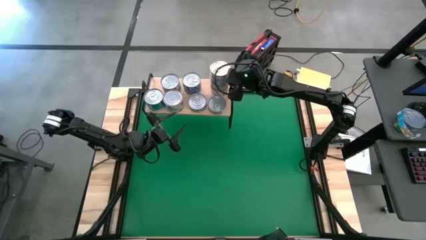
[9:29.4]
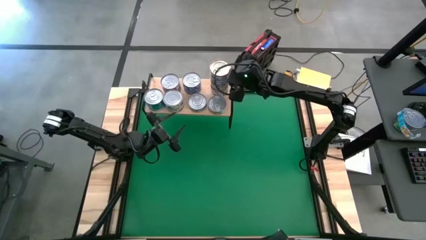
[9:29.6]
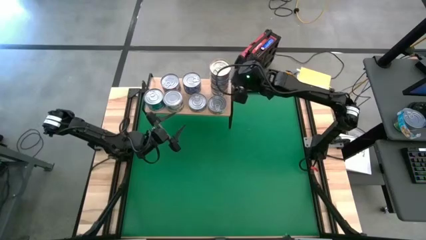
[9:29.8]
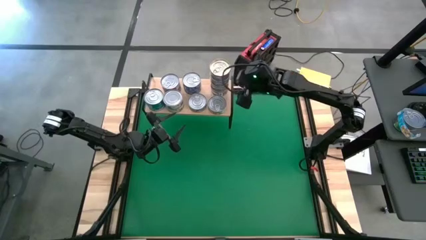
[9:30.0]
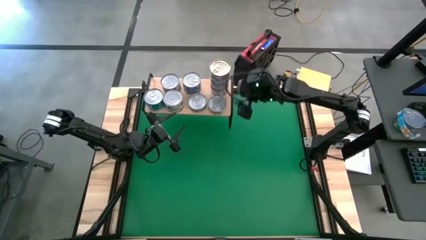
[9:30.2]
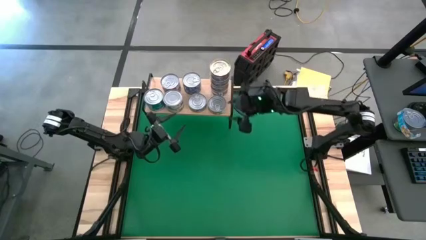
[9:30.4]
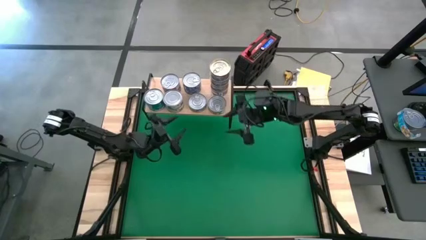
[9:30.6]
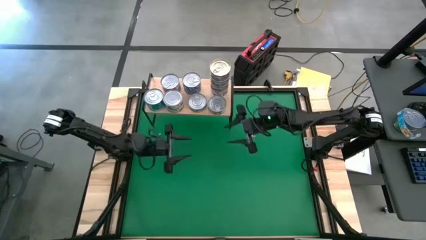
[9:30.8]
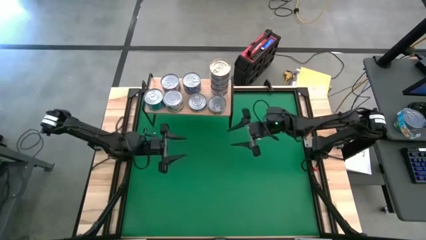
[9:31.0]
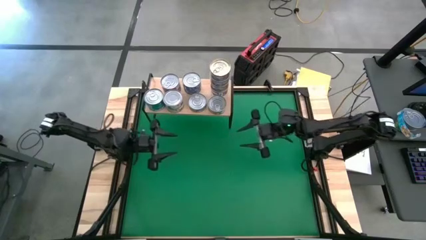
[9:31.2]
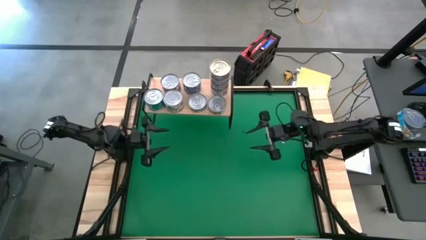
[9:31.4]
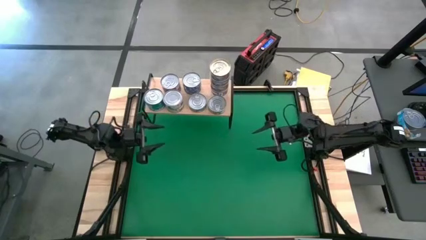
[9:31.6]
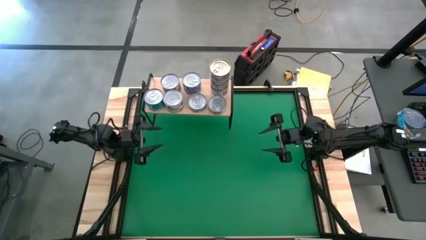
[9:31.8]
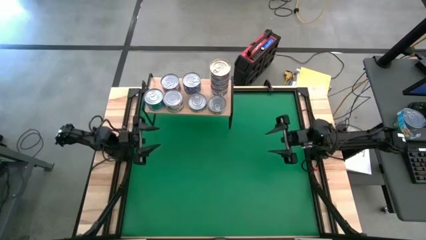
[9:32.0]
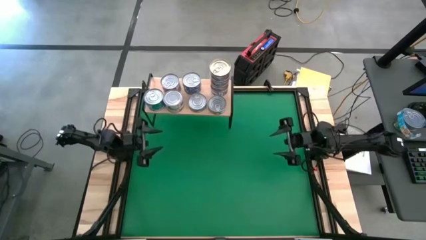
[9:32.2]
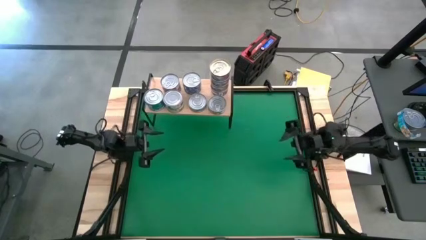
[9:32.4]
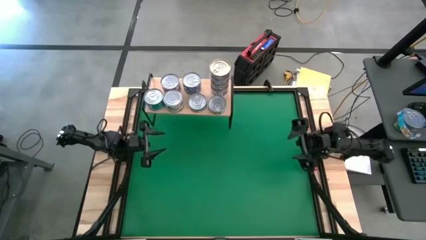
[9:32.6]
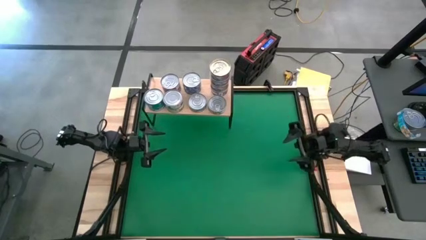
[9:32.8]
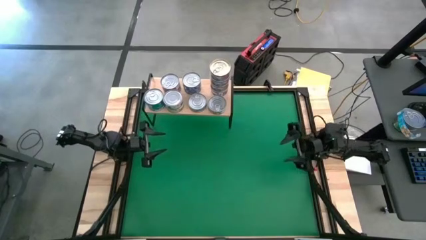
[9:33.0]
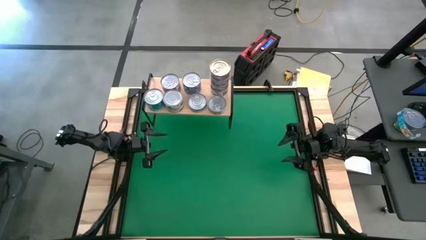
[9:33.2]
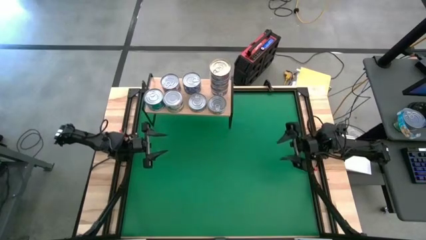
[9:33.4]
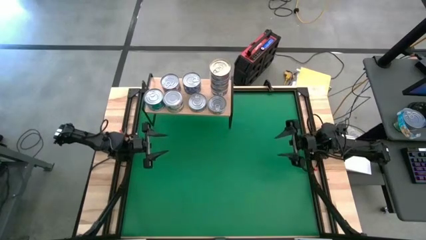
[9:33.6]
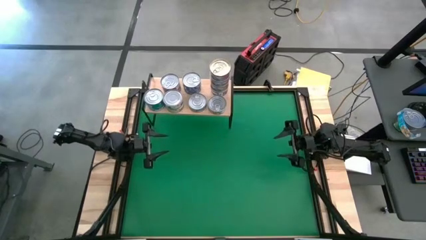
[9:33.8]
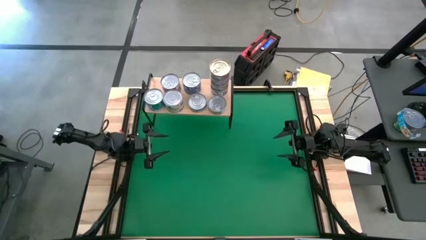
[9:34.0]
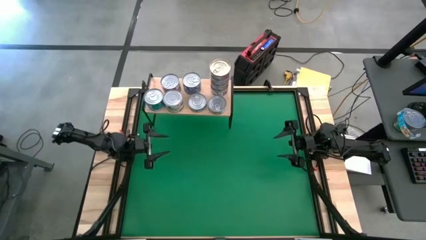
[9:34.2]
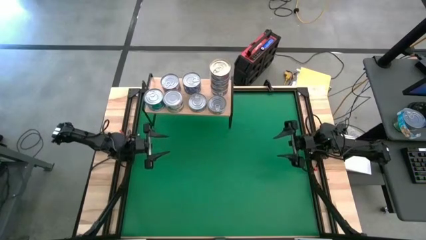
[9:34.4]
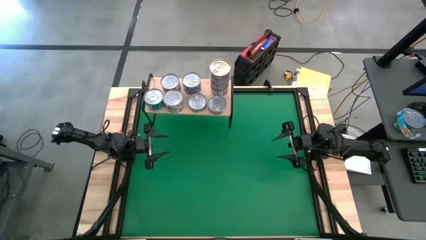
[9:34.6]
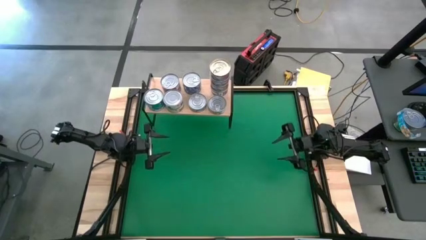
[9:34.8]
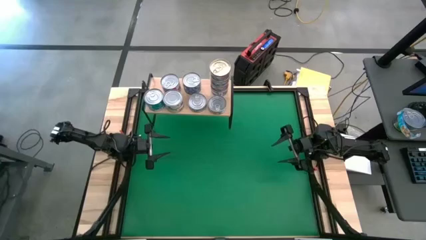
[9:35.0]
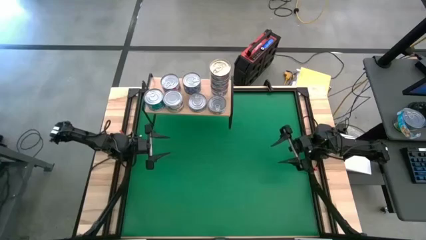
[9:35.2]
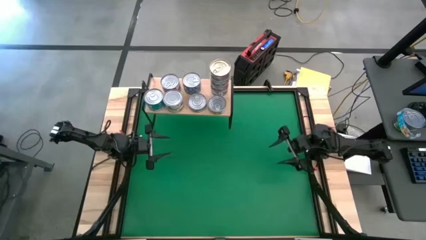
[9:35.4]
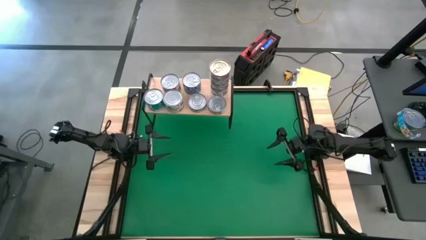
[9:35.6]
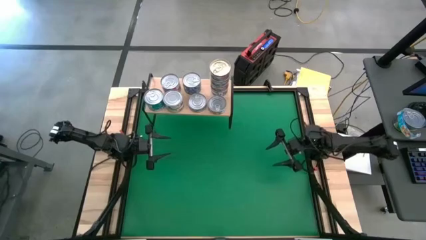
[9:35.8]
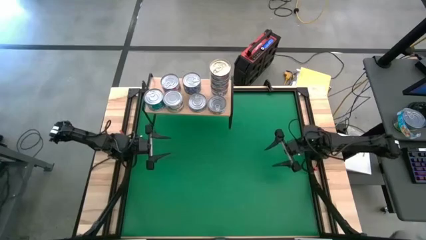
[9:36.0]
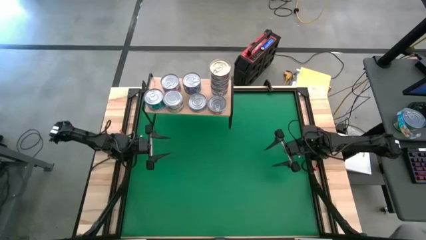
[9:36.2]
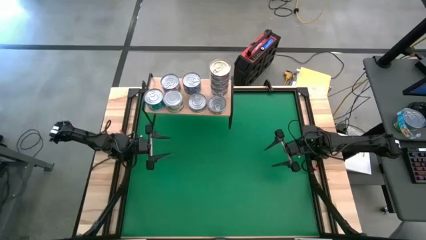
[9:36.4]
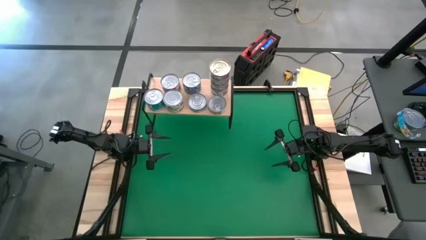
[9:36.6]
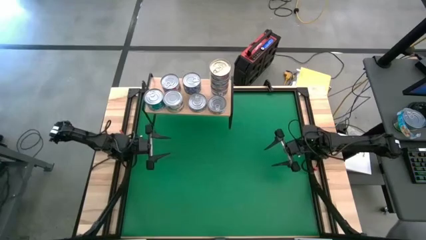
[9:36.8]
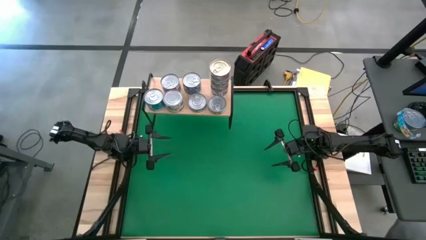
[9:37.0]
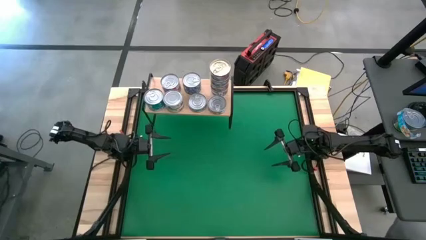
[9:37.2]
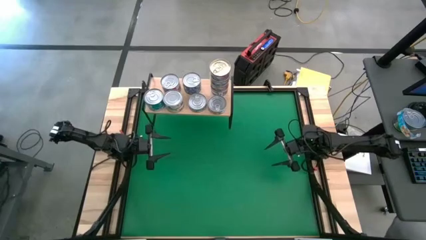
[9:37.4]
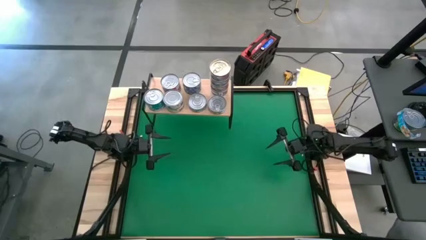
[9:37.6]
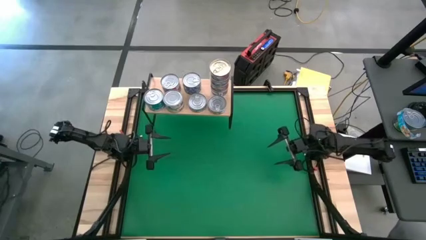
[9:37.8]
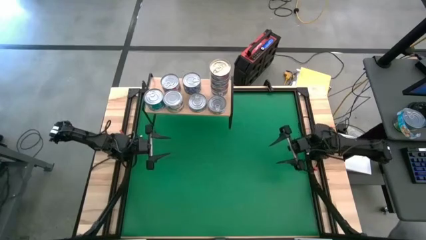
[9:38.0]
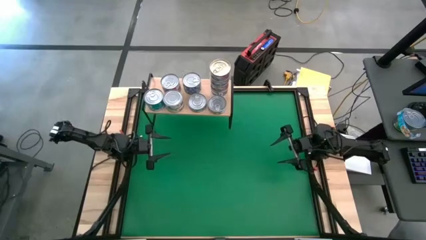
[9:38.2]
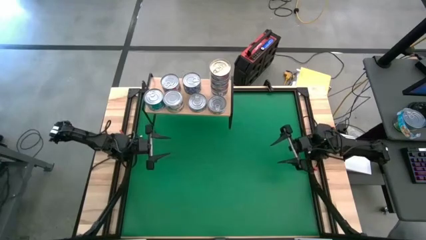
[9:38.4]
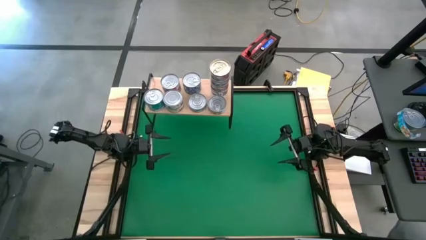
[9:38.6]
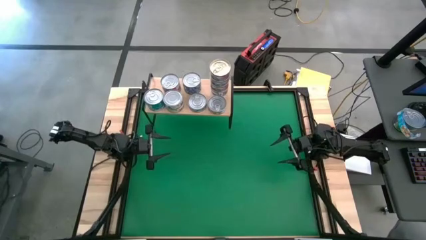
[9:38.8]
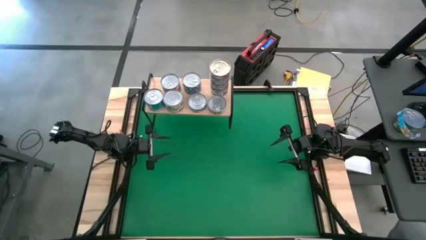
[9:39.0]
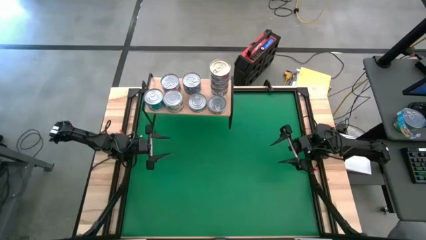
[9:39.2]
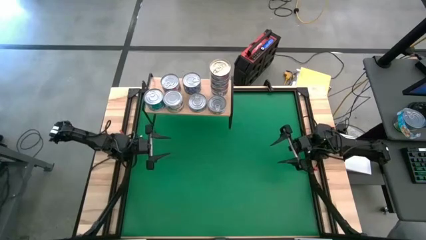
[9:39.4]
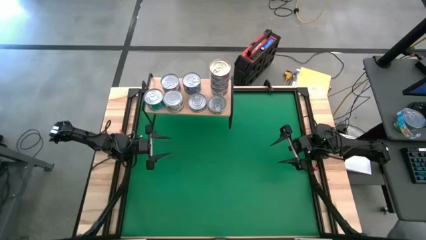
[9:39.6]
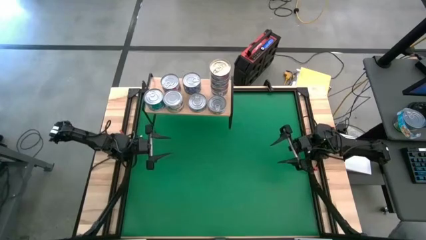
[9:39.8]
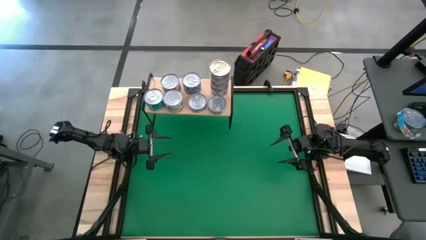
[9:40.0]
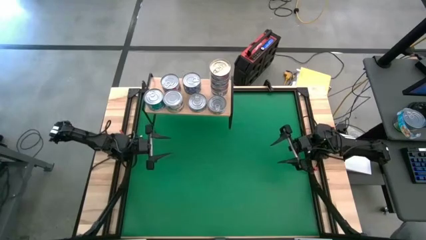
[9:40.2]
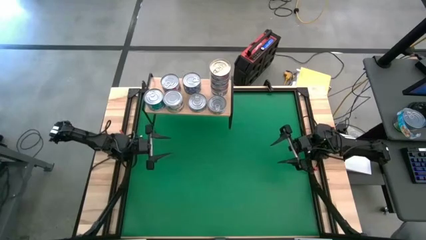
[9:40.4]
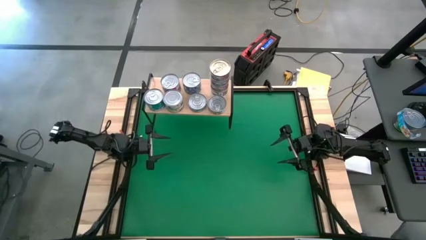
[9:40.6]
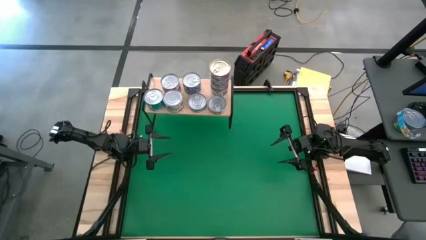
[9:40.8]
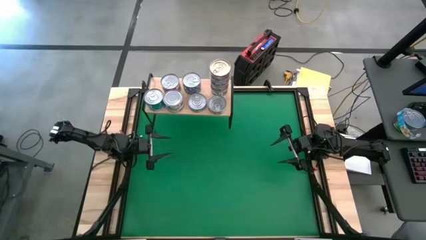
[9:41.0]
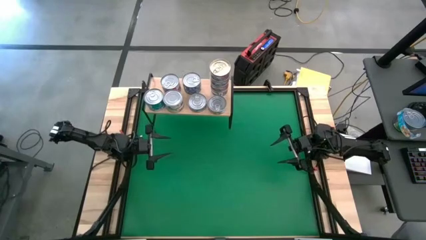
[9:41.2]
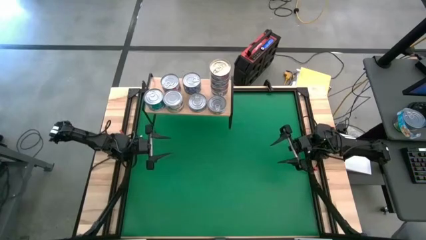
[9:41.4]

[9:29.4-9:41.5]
Task: Stack canned seafood by type on shelf
Return to Home Position
